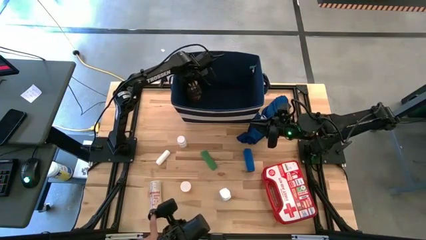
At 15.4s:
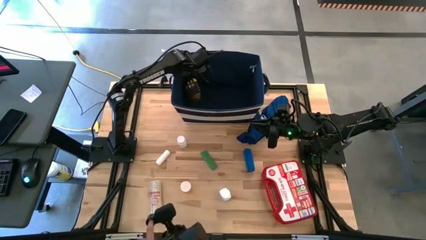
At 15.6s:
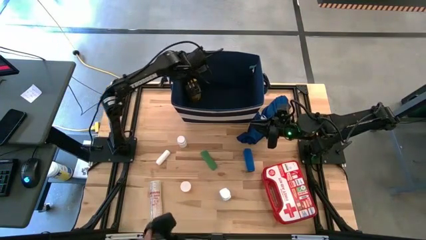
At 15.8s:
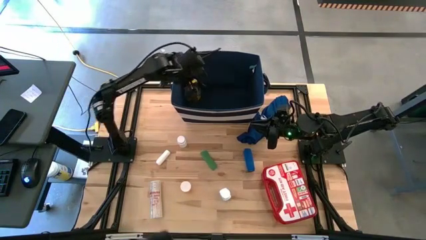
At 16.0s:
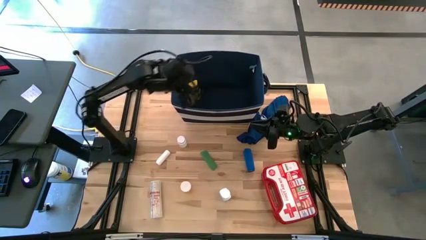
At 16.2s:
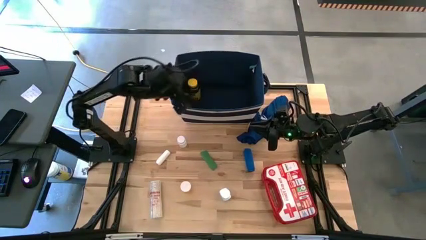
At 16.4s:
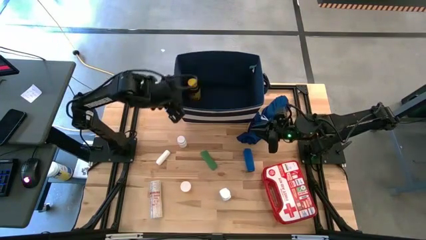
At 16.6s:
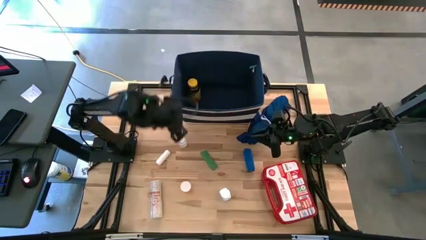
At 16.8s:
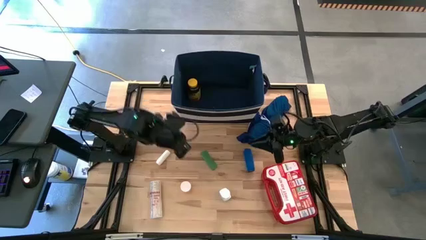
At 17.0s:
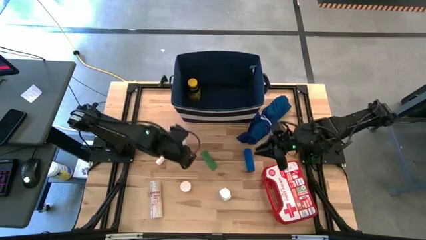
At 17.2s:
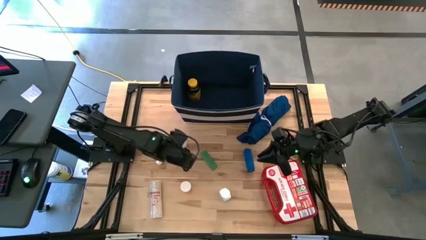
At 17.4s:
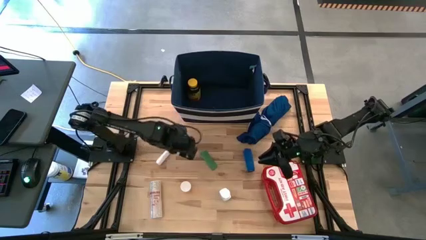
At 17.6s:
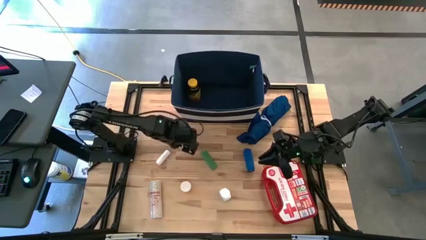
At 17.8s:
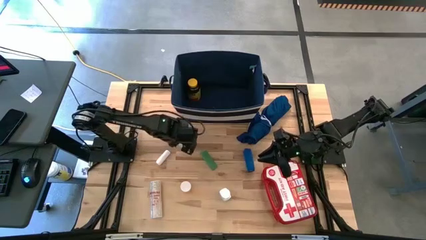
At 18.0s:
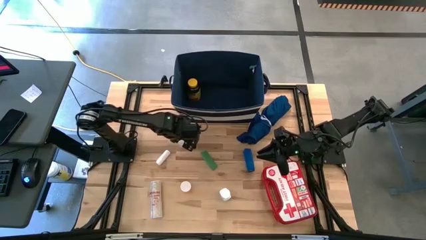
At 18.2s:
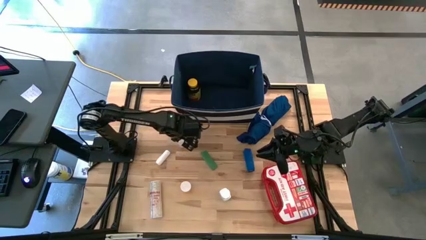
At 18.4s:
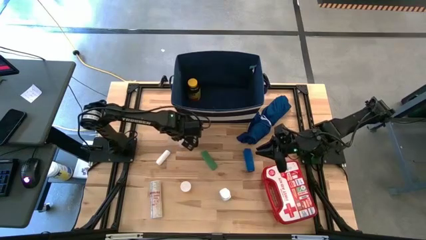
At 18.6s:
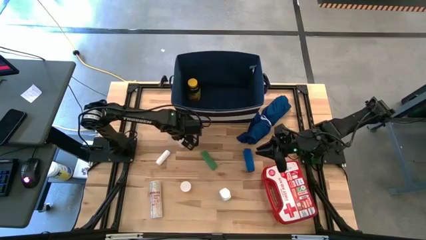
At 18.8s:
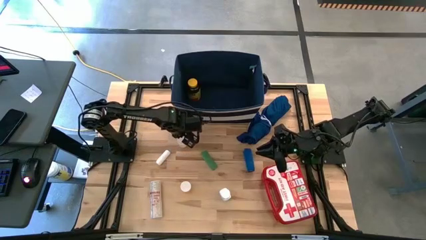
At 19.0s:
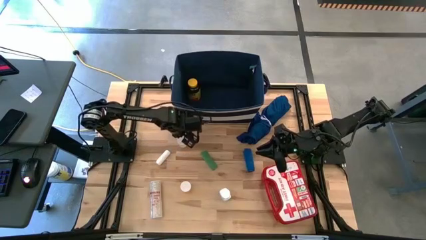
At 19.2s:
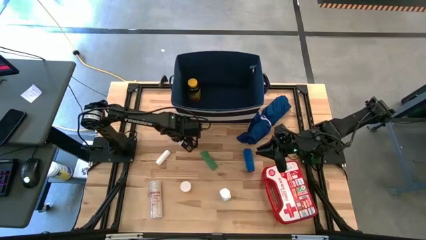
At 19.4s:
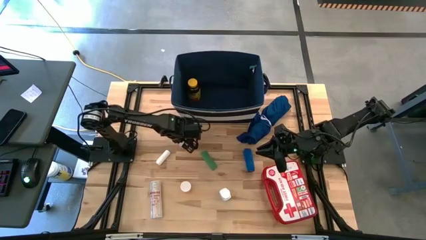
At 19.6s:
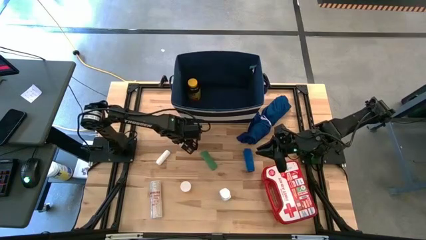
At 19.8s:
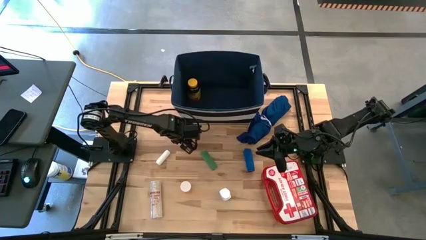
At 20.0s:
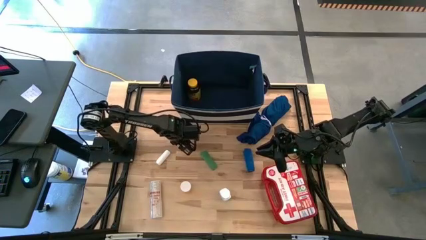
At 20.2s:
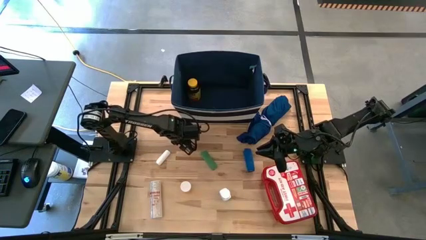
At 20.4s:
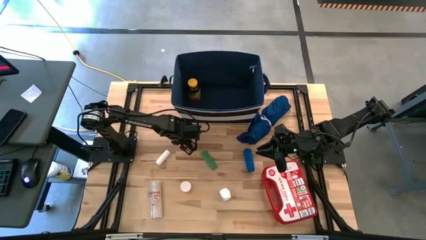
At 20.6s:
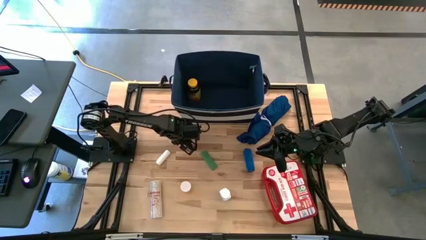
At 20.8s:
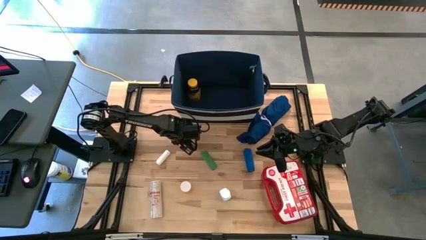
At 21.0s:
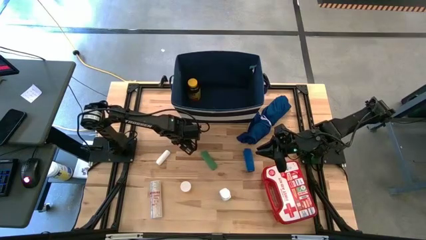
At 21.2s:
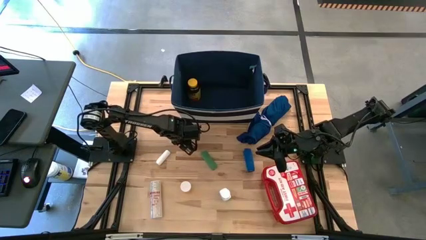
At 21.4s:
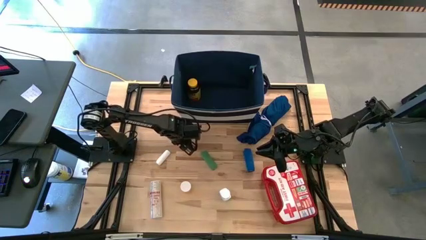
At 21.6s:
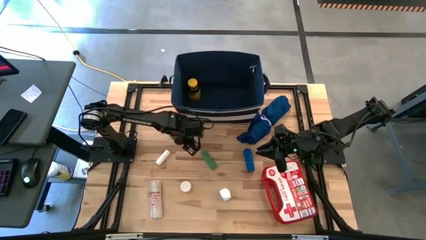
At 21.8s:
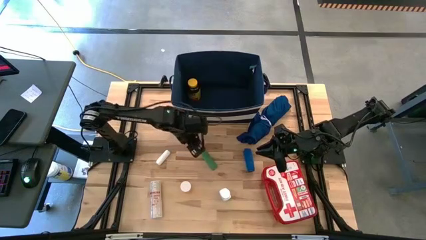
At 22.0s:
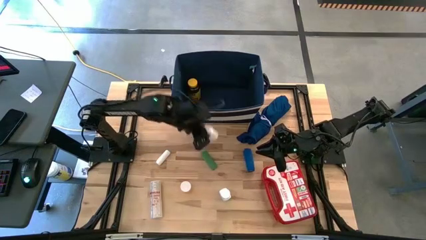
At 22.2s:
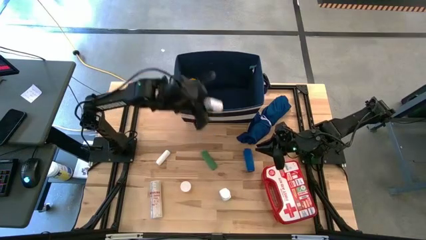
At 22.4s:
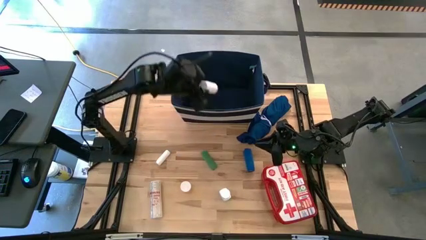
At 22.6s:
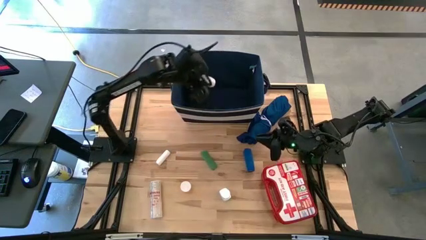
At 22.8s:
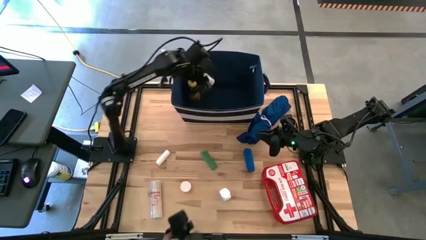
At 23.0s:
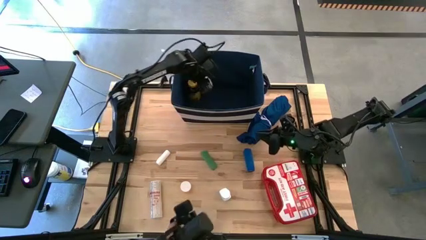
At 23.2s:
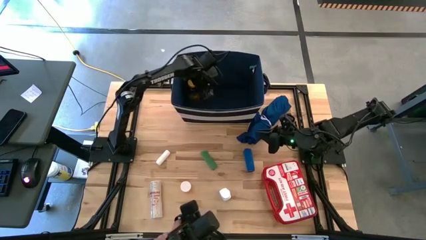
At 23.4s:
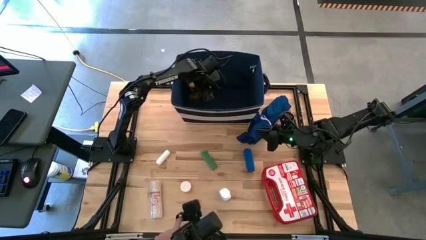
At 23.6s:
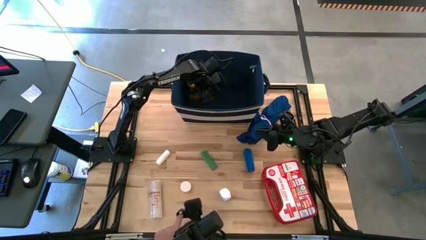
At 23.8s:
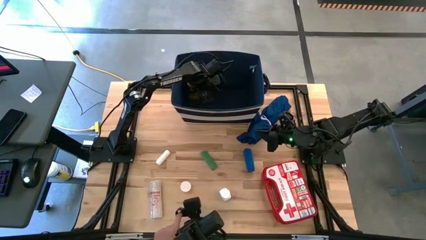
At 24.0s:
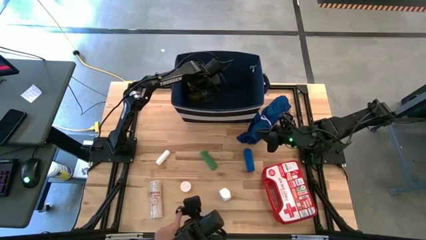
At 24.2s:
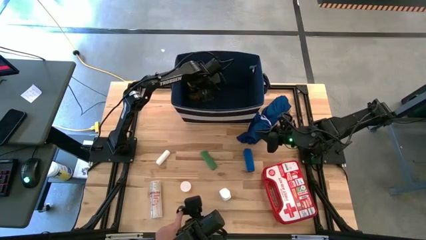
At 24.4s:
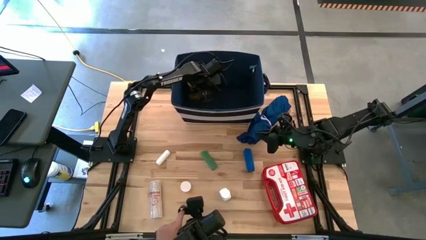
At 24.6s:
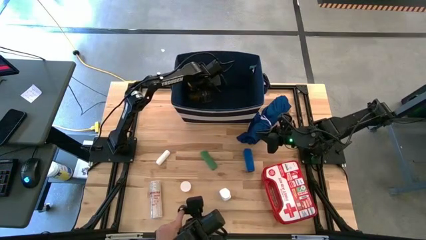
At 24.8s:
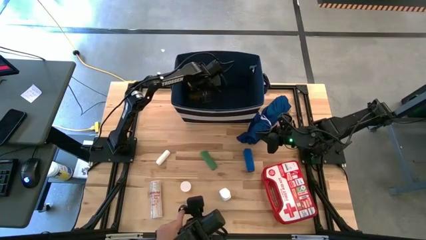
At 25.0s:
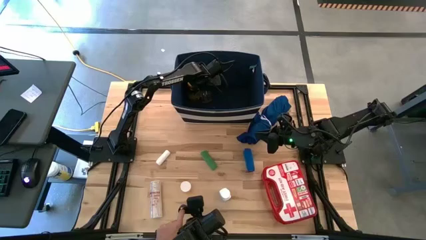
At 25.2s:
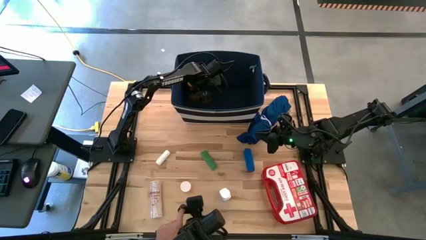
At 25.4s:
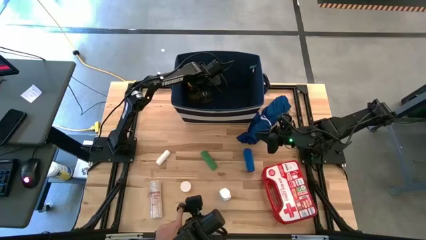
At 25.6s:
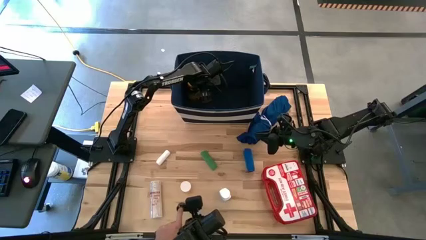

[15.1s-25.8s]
Task: Pick & place medical supplies in basket/bin
Put the top white pill bottle into the blue bin

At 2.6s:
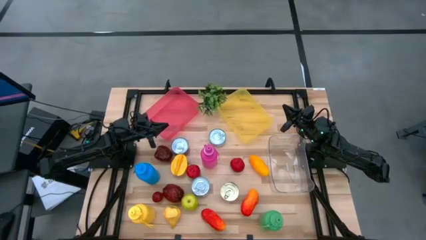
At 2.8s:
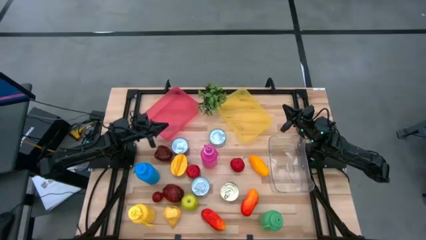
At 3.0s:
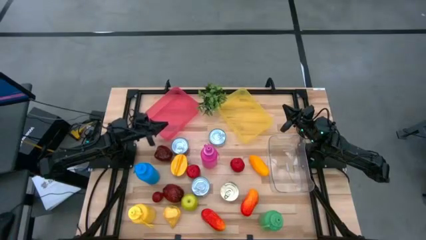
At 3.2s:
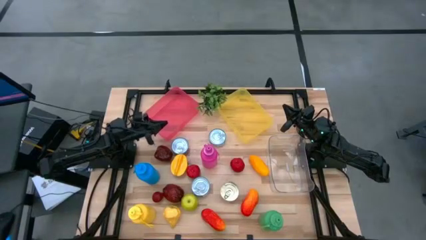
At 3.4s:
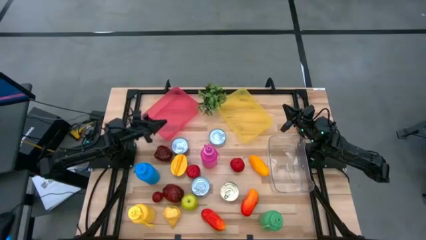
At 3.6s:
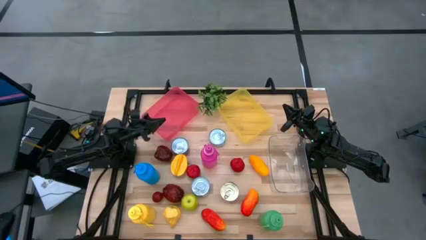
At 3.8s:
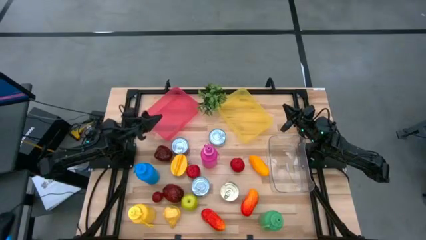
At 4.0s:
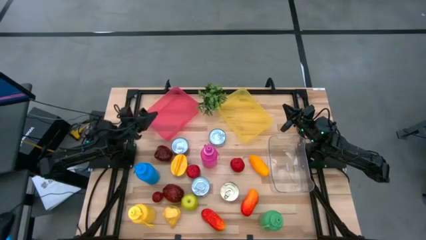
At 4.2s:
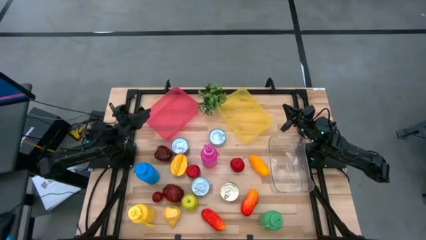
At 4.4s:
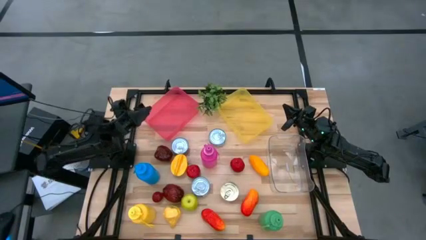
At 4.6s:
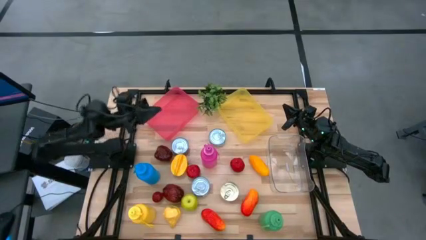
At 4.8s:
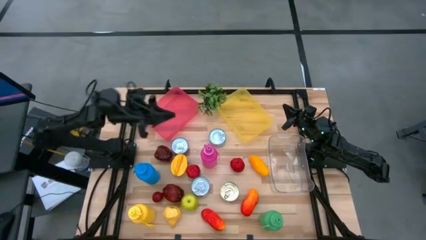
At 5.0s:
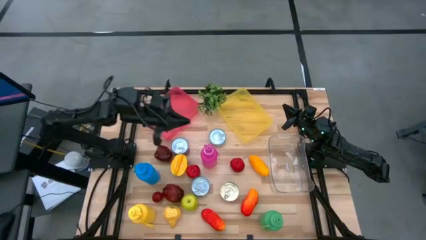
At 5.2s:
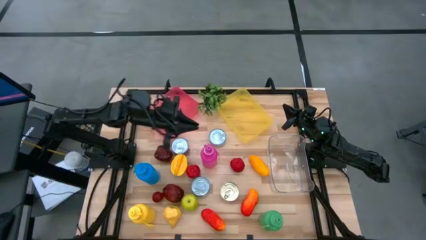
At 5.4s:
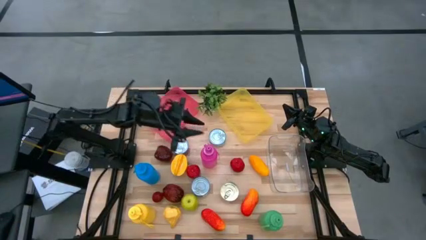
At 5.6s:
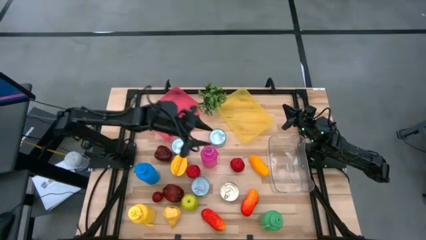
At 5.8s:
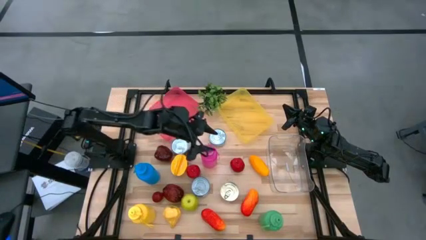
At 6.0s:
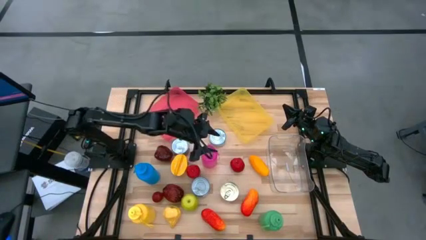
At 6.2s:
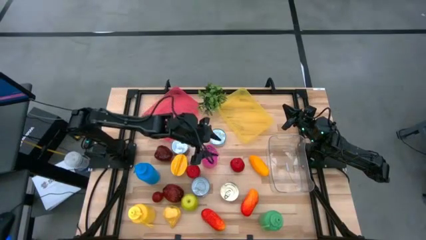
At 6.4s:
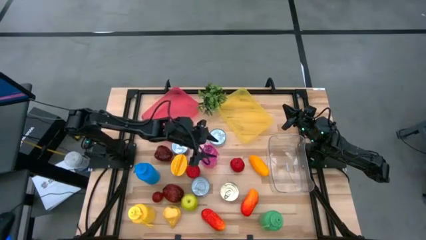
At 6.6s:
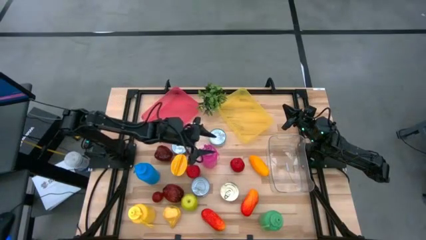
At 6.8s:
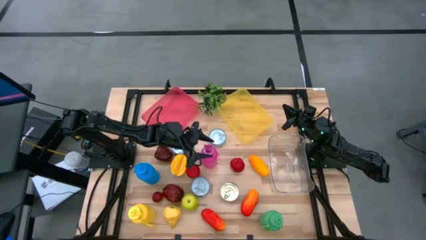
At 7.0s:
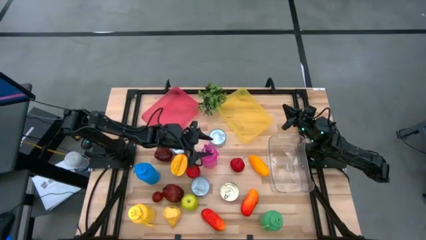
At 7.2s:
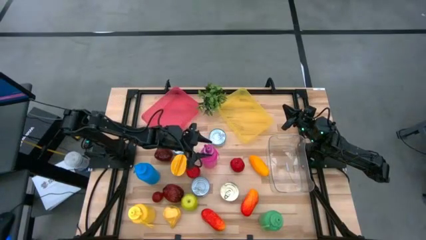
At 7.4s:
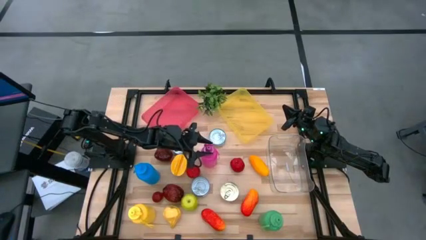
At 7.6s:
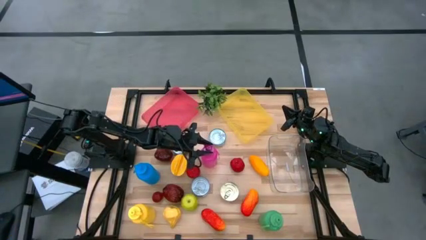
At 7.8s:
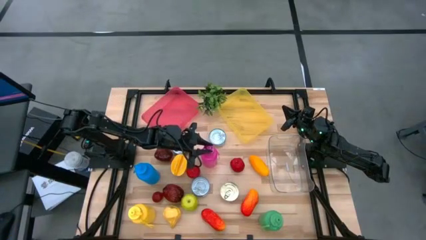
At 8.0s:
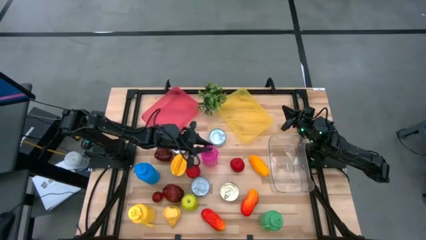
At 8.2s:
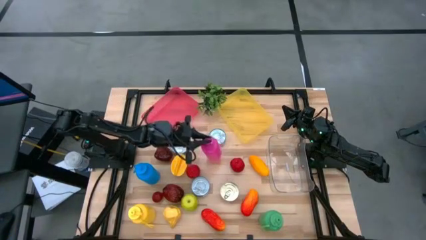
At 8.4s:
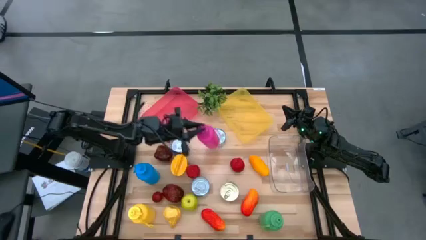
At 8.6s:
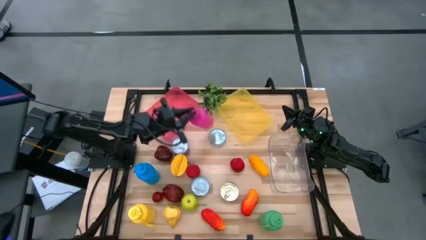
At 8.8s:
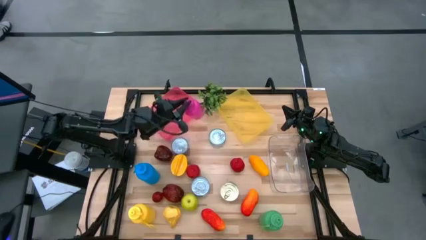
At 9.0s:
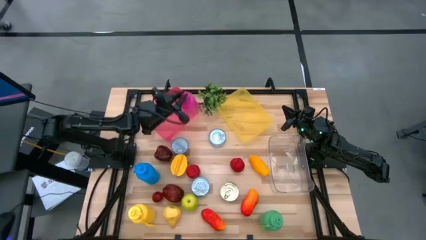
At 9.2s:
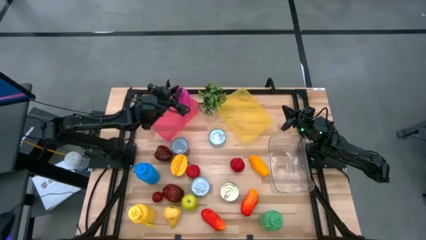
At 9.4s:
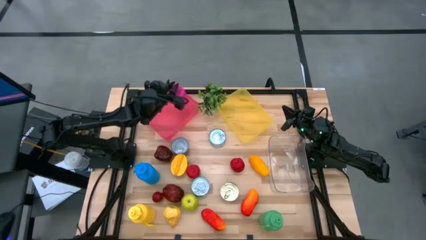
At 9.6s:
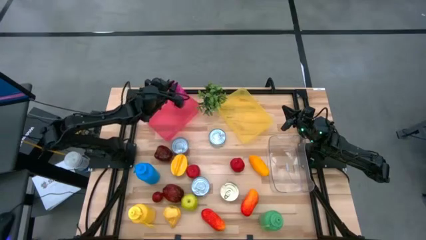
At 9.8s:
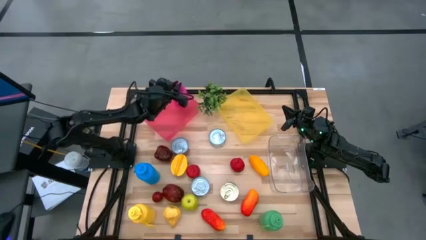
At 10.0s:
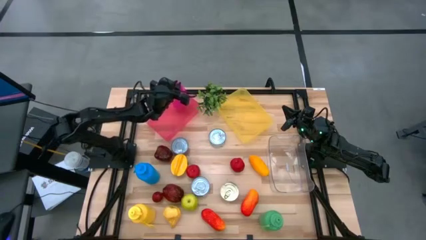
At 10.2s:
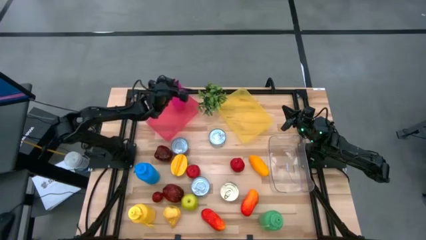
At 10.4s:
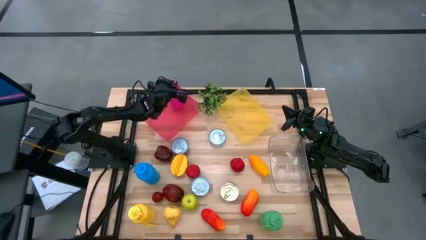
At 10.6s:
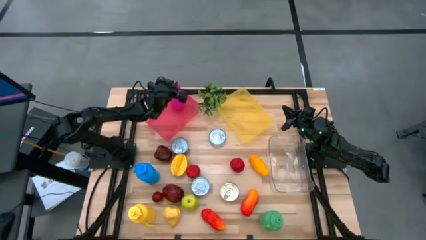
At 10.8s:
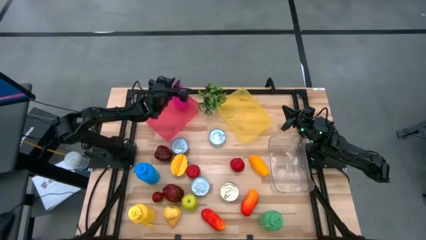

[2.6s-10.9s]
Task: Pick & Place Food Item
Put the pink water bottle into the pink bin
